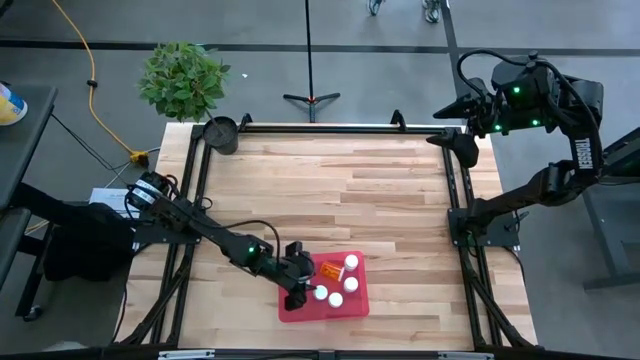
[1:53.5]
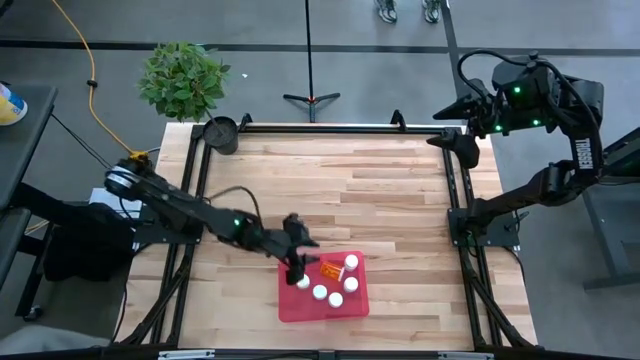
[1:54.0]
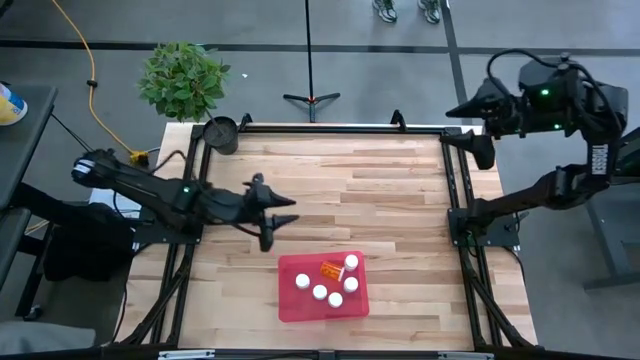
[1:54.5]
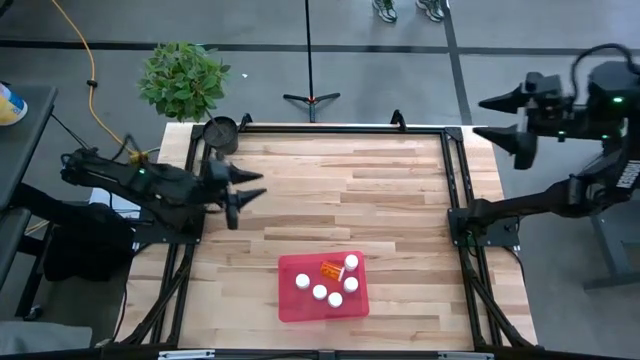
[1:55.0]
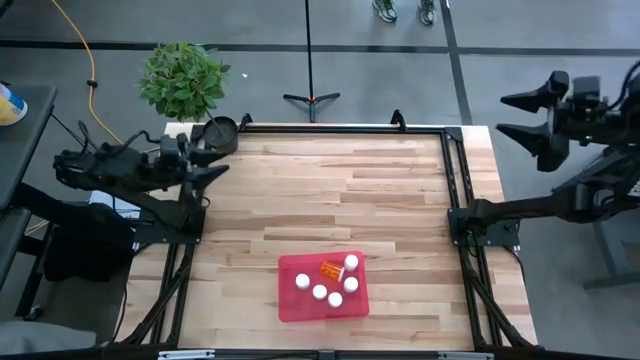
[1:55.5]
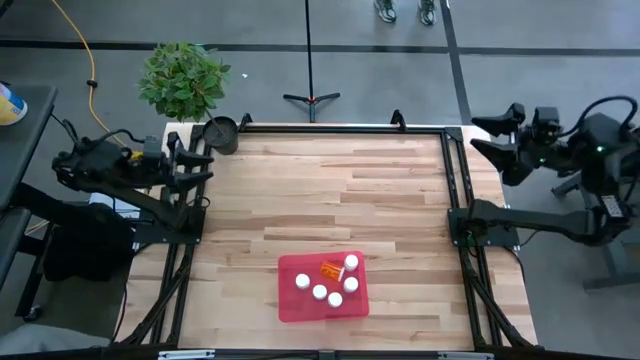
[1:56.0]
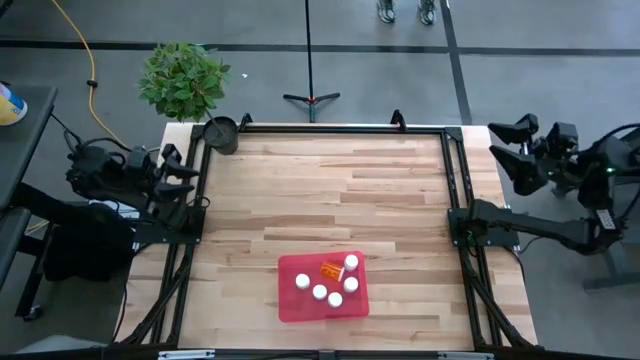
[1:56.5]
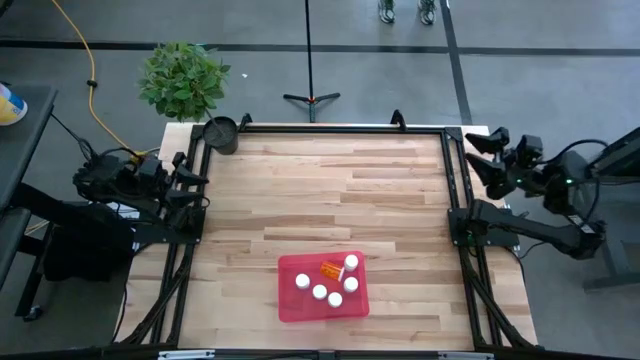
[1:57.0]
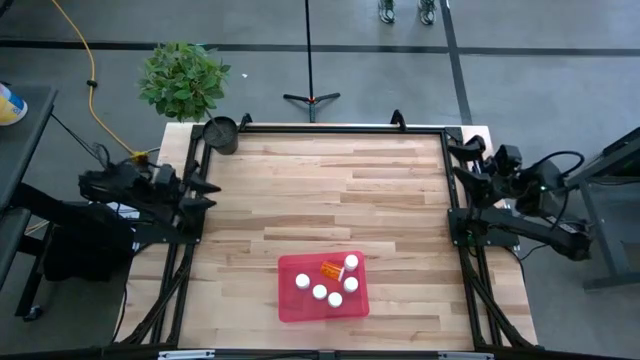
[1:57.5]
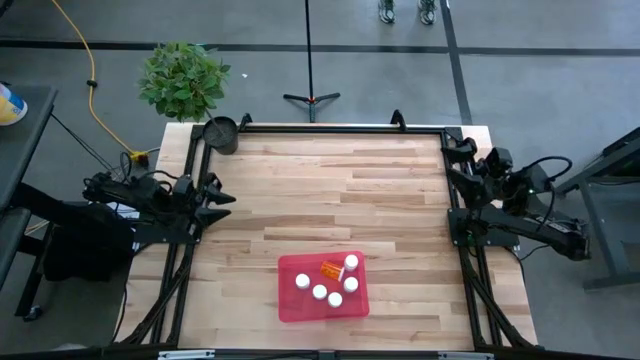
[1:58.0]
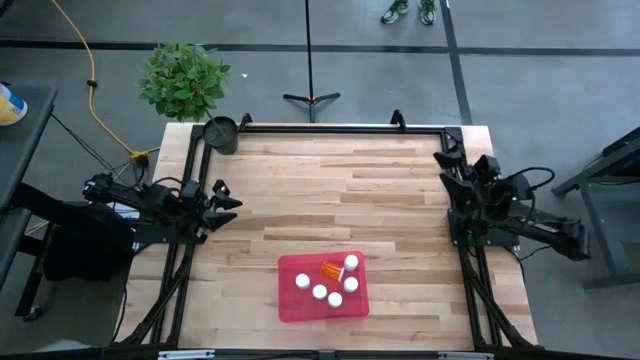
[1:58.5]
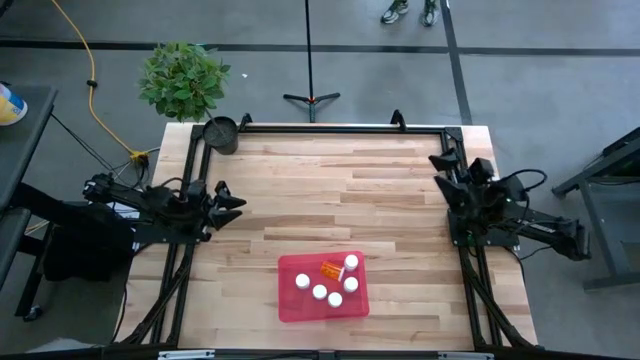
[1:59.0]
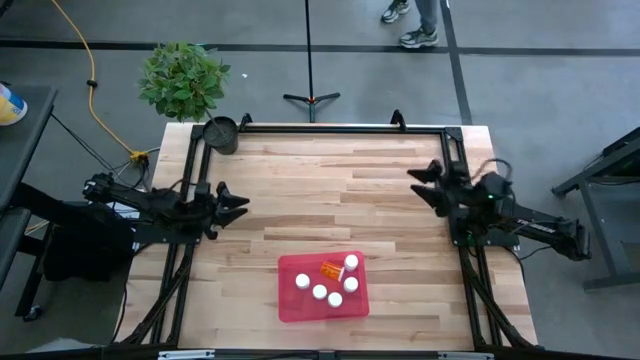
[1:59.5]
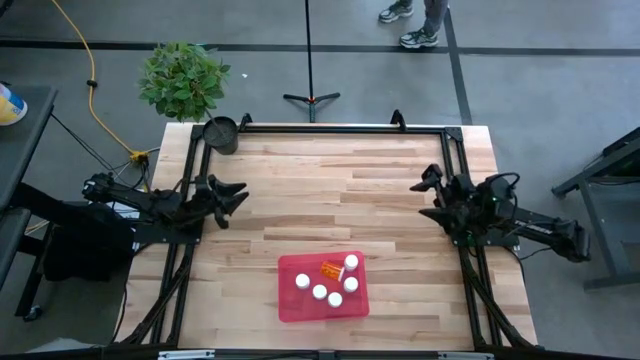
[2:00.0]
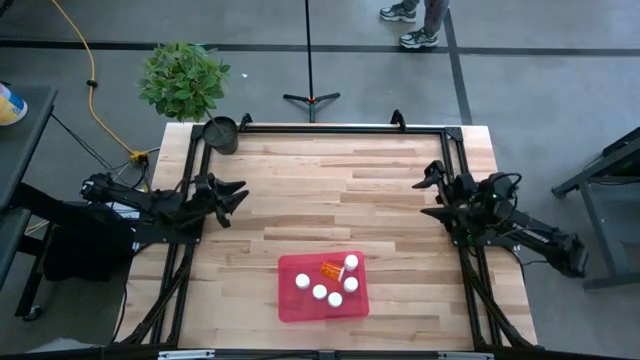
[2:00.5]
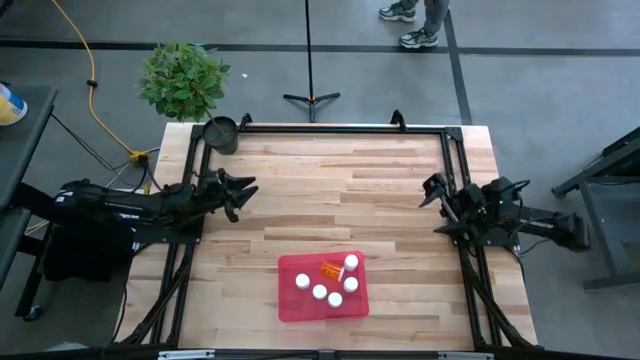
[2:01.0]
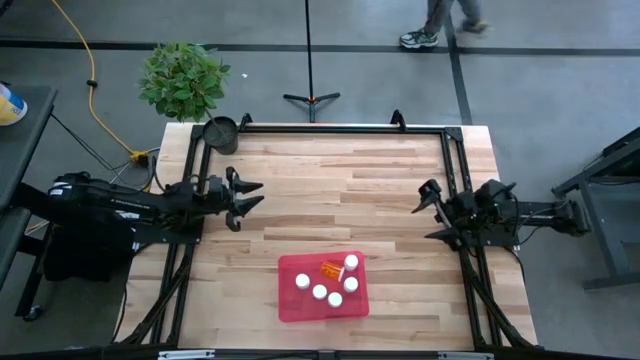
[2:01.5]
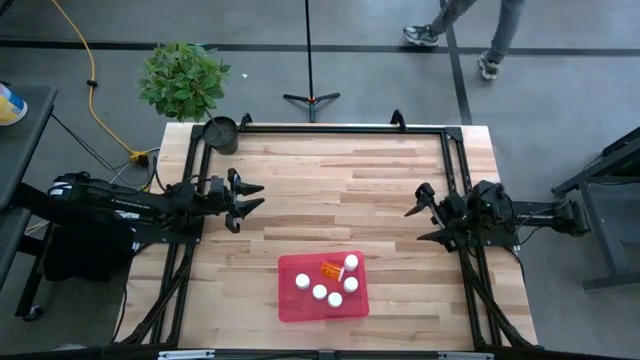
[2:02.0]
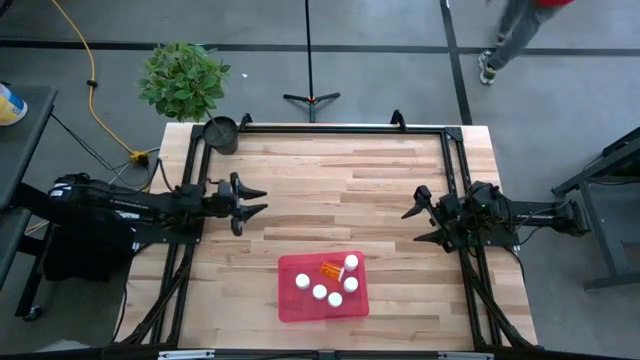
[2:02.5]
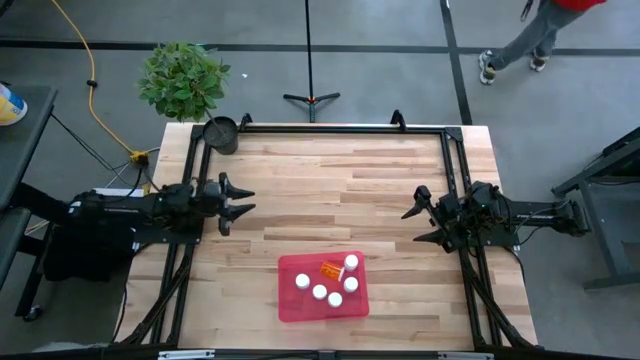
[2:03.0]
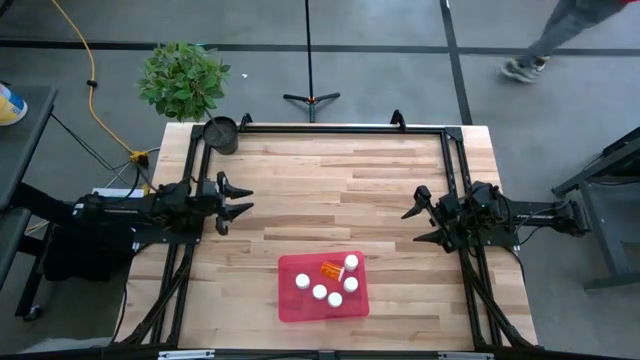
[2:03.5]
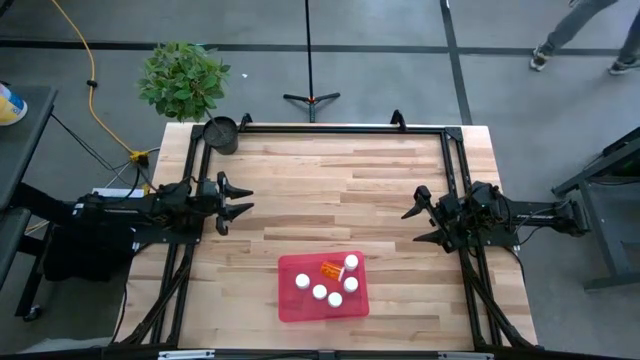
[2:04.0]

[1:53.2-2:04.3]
Task: Pick and place pill bottles into a basket
Return to Home Position

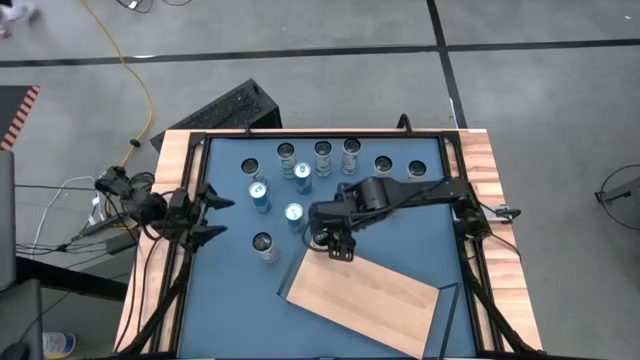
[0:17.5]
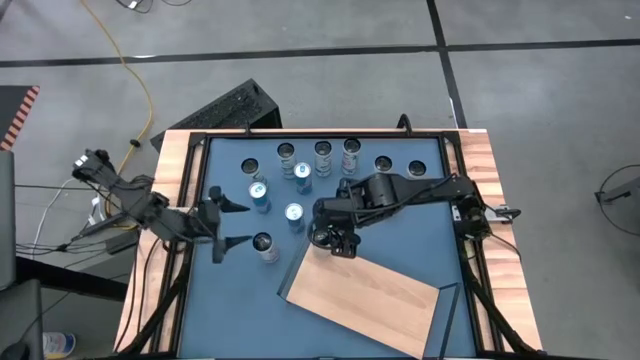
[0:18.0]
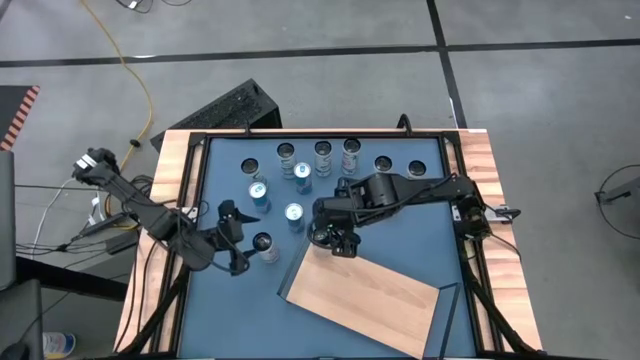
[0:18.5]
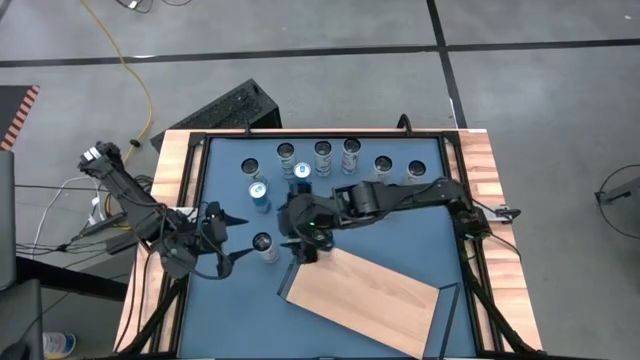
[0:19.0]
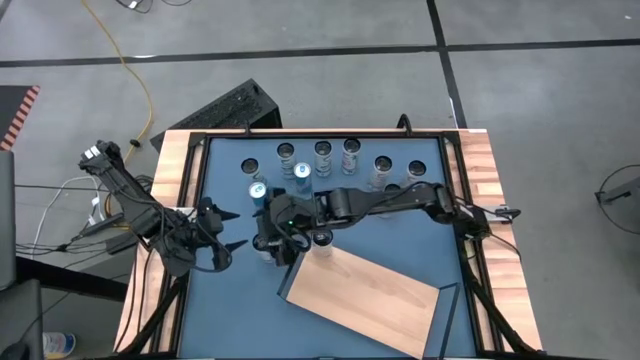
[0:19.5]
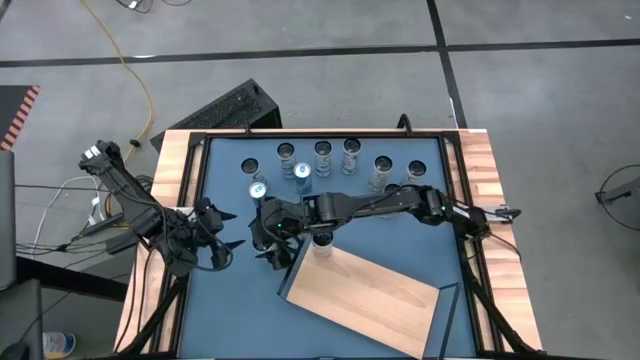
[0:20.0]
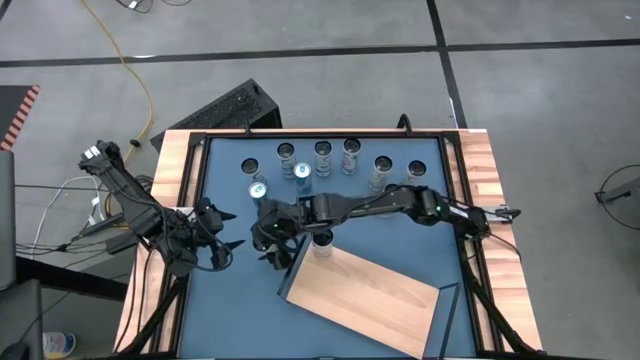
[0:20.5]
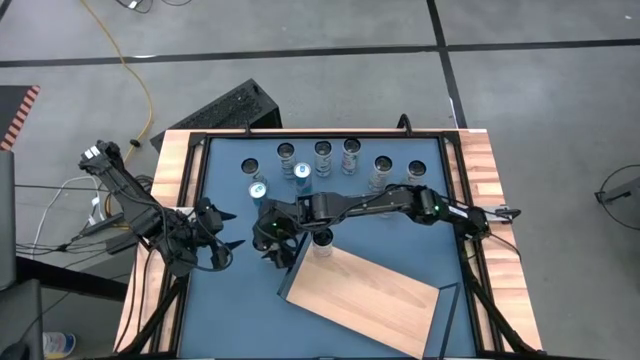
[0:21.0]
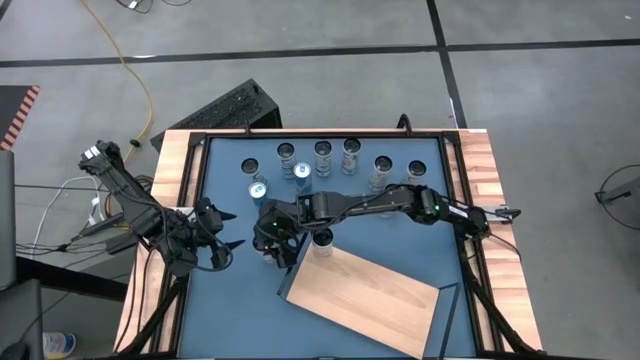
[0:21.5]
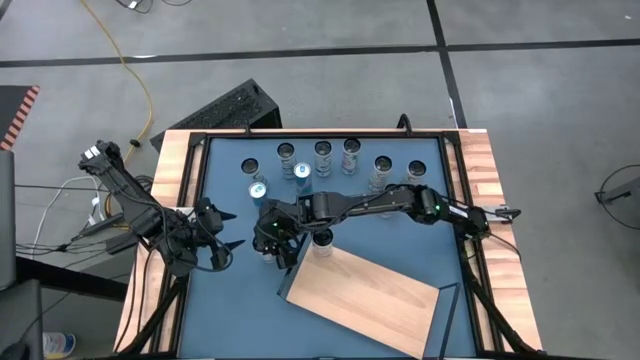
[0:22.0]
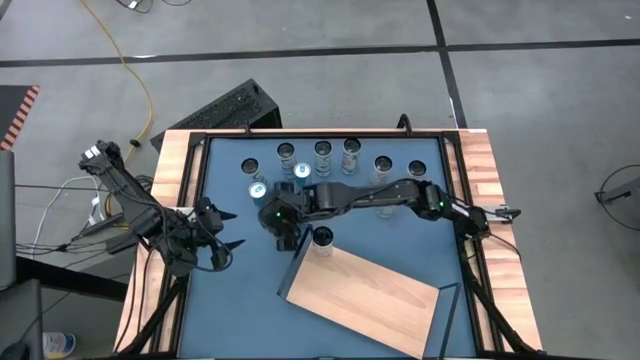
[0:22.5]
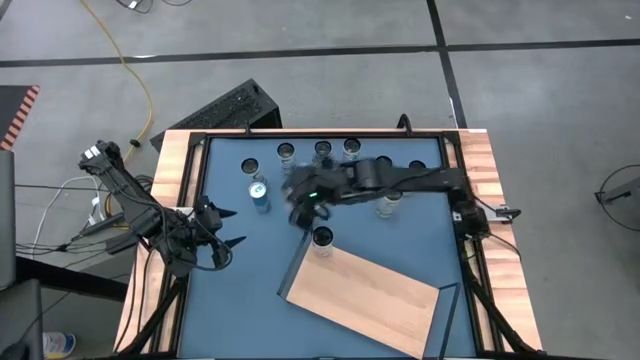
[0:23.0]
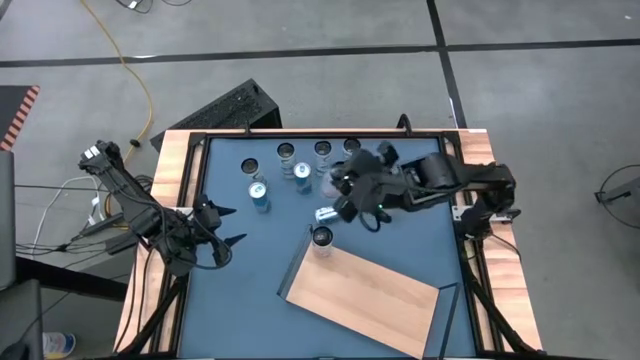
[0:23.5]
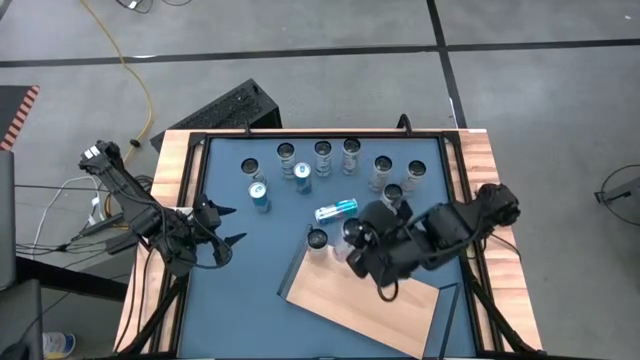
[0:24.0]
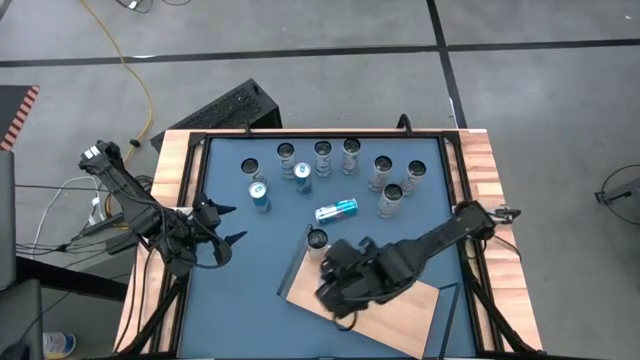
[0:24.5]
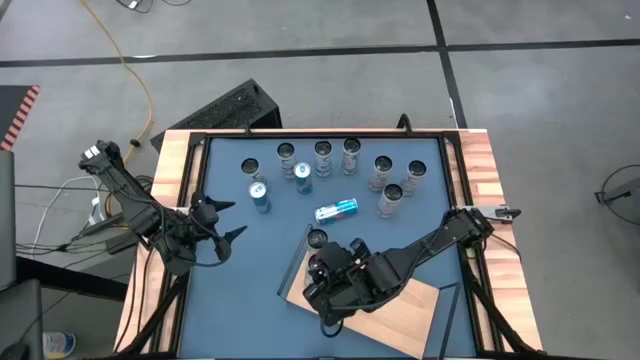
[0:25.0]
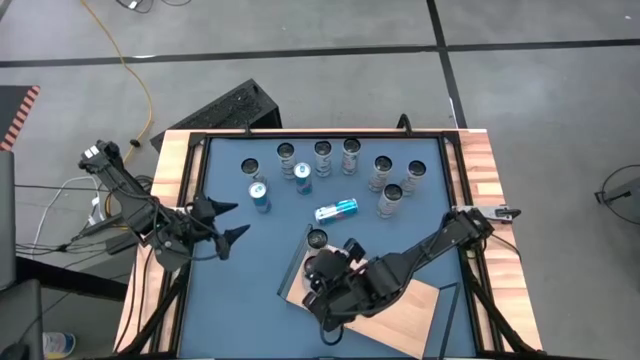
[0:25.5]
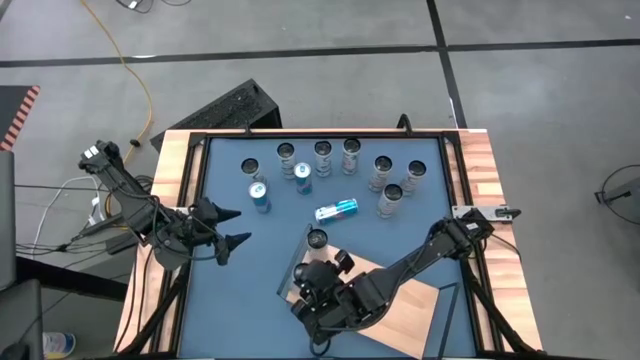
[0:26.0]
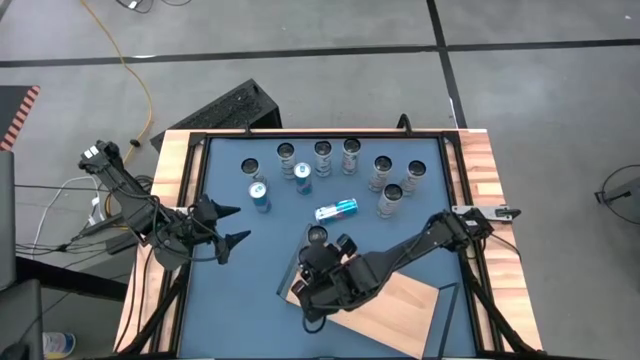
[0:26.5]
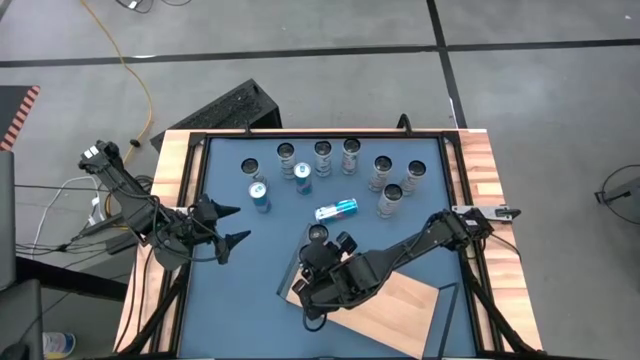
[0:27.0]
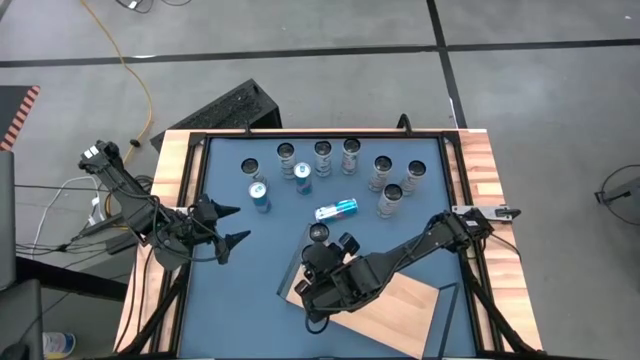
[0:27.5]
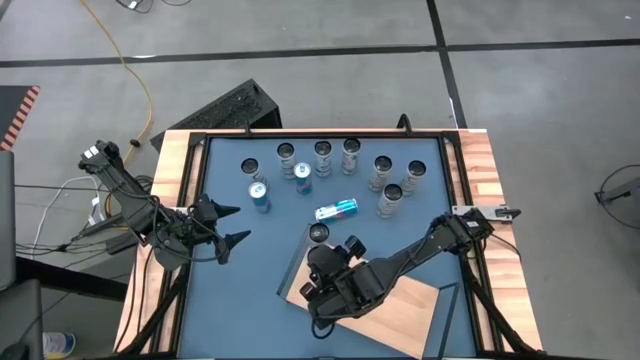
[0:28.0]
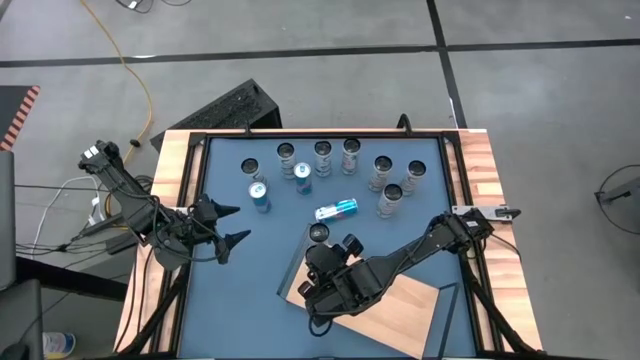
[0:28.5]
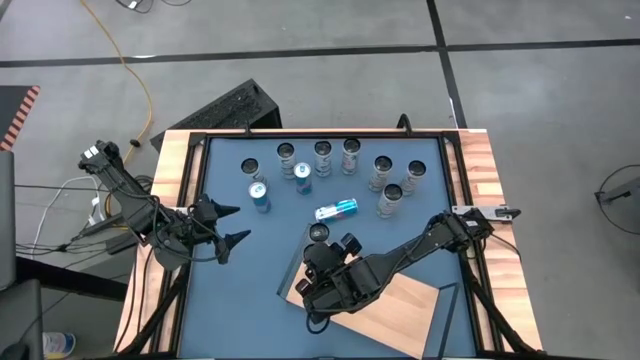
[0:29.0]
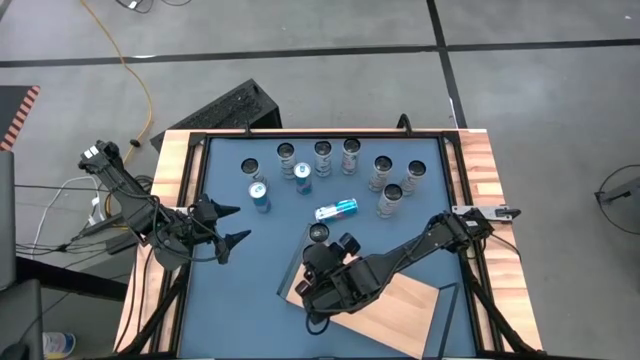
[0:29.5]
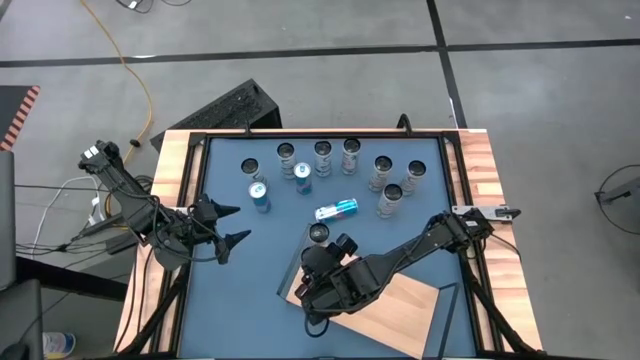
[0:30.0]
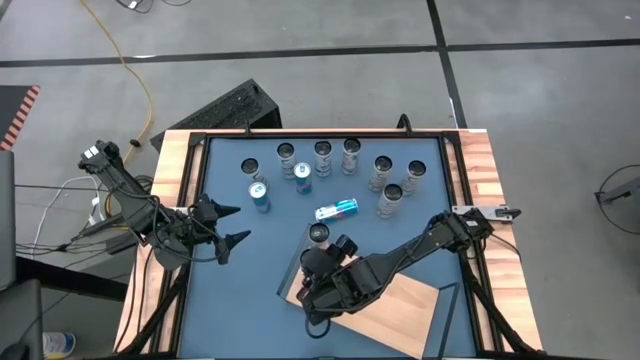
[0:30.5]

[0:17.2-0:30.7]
Task: Place canned beverage on shelf
Put the bottom white pink soda can aligned with the other white pink soda can on the shelf
